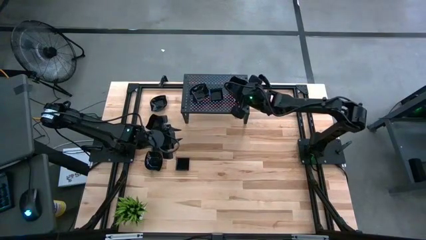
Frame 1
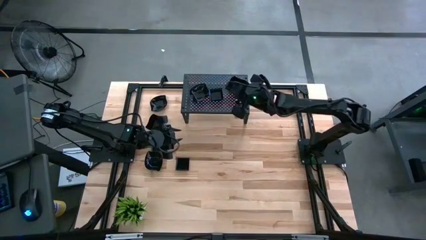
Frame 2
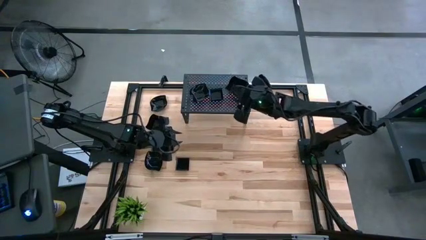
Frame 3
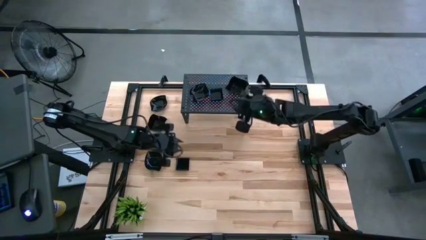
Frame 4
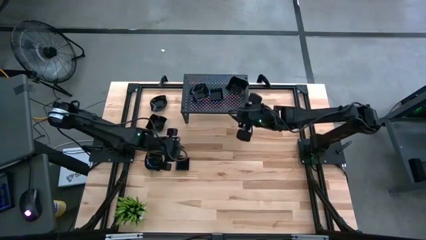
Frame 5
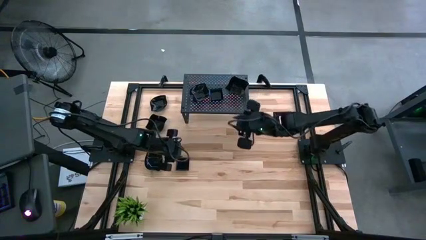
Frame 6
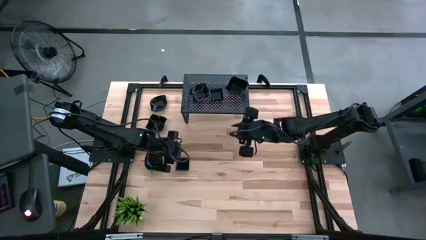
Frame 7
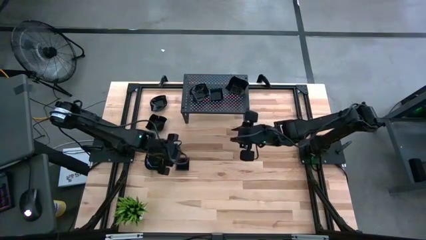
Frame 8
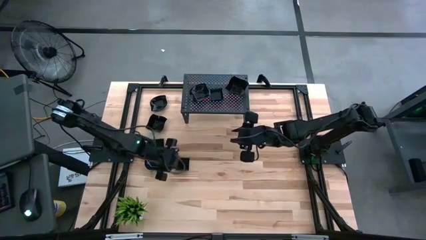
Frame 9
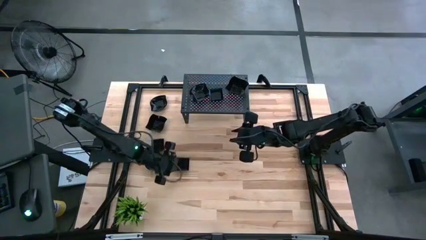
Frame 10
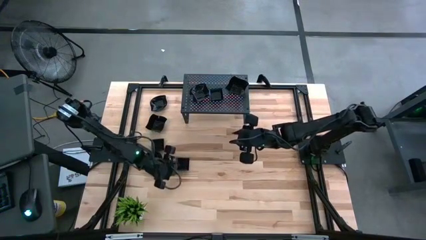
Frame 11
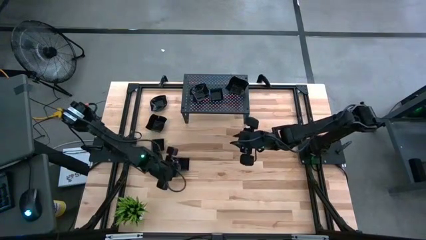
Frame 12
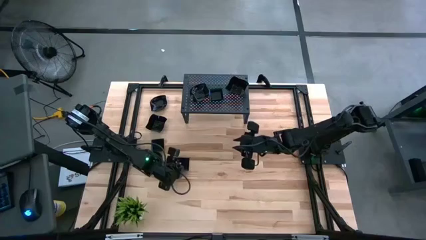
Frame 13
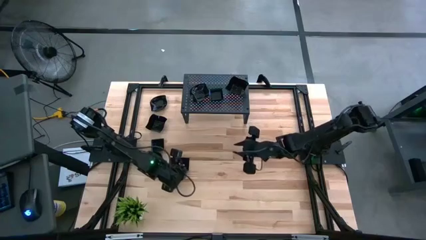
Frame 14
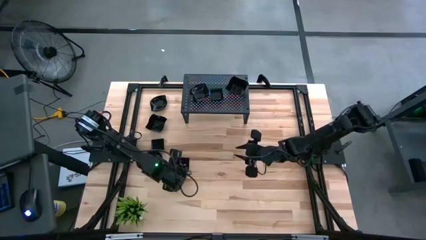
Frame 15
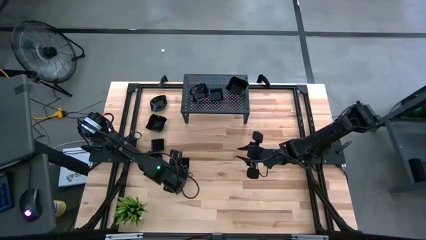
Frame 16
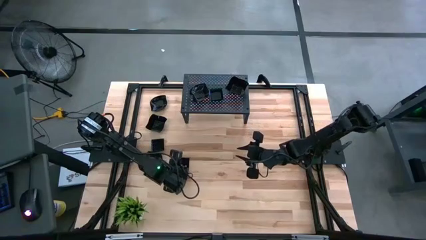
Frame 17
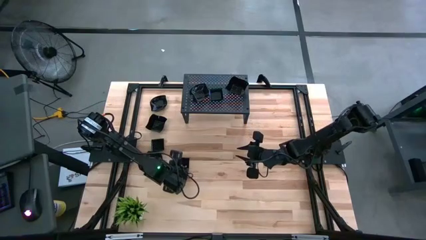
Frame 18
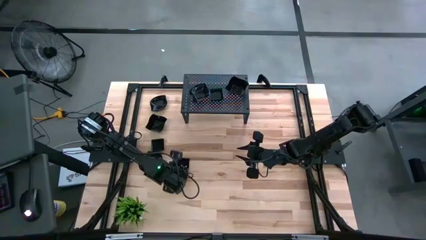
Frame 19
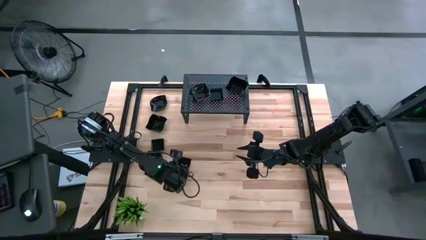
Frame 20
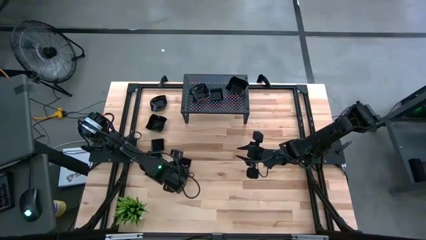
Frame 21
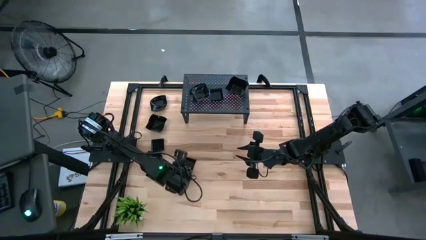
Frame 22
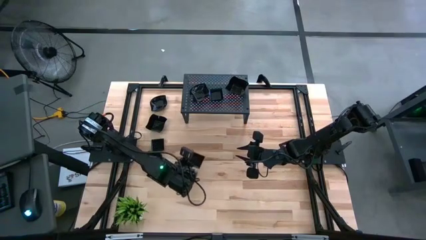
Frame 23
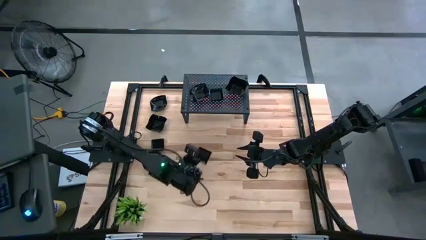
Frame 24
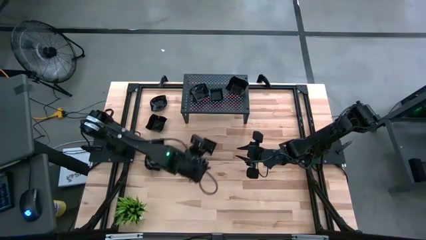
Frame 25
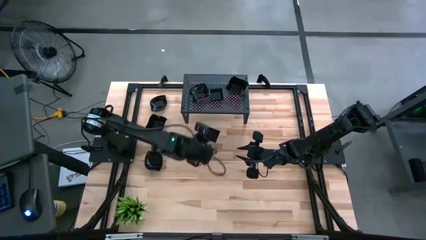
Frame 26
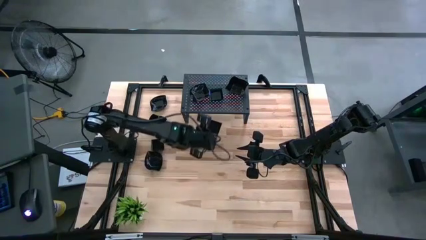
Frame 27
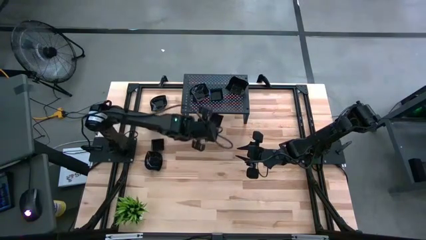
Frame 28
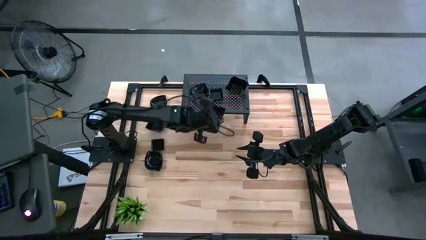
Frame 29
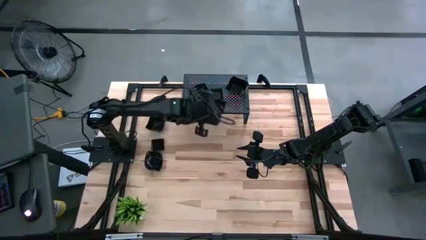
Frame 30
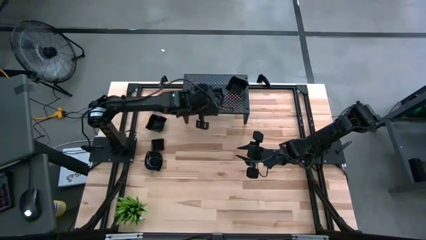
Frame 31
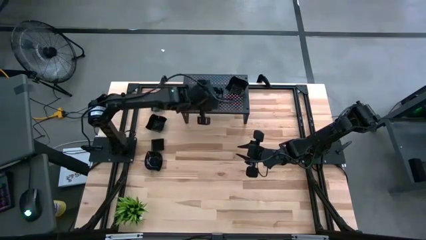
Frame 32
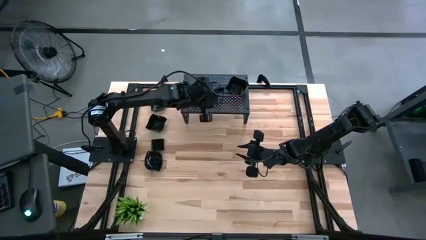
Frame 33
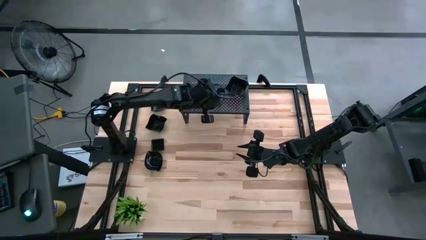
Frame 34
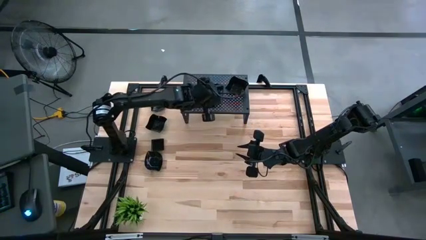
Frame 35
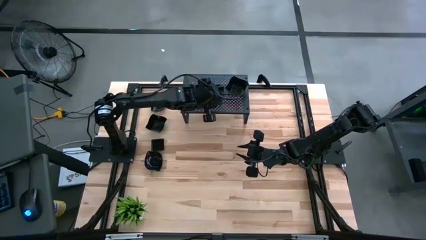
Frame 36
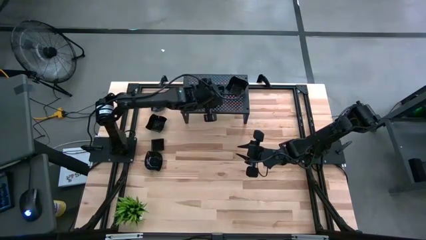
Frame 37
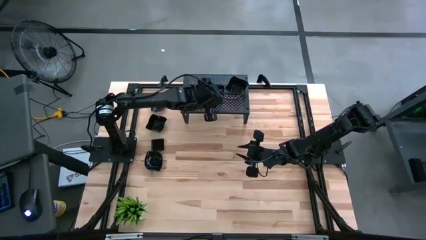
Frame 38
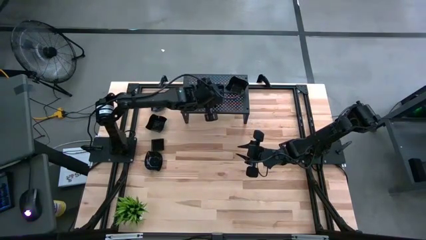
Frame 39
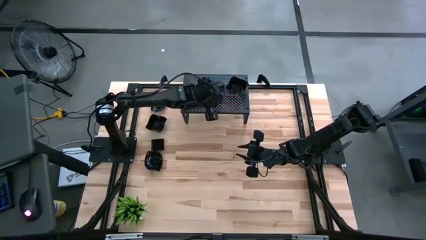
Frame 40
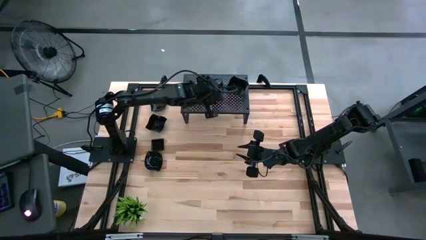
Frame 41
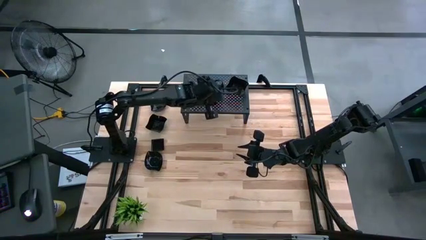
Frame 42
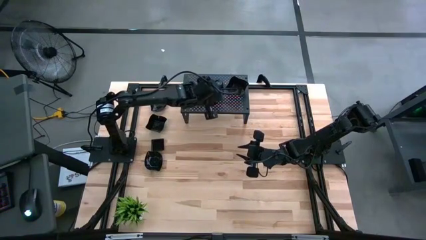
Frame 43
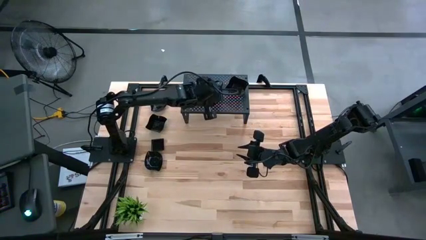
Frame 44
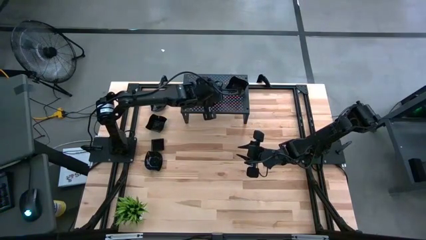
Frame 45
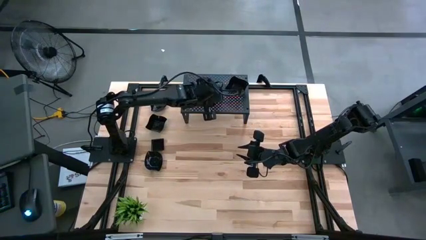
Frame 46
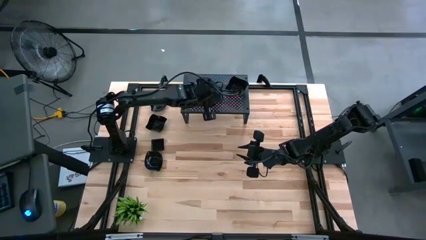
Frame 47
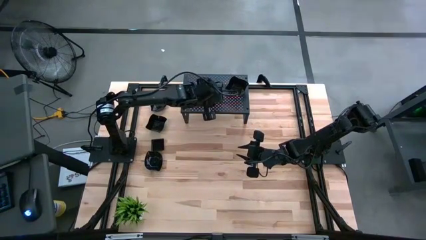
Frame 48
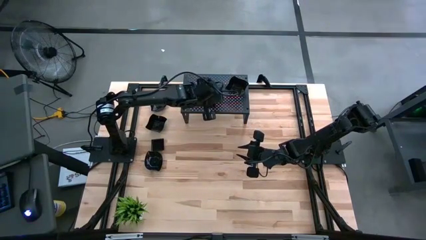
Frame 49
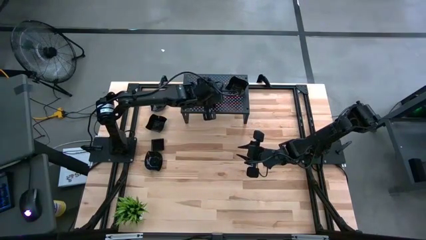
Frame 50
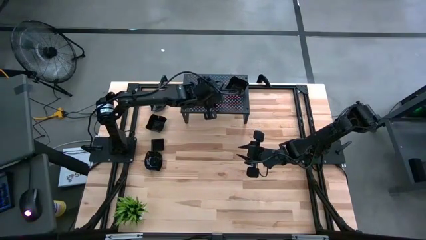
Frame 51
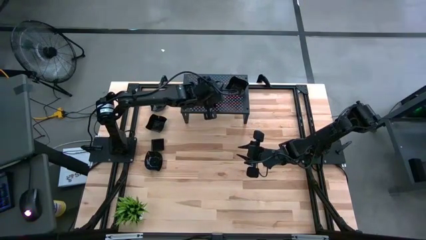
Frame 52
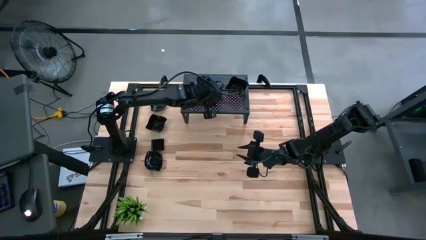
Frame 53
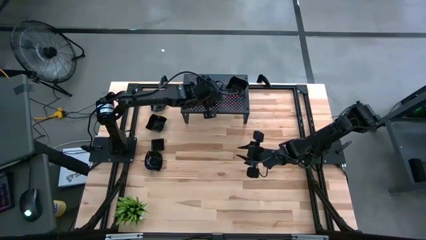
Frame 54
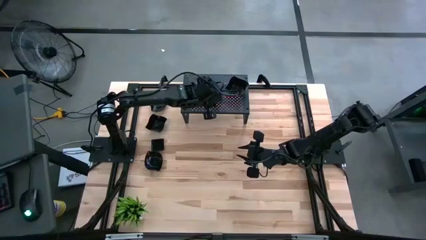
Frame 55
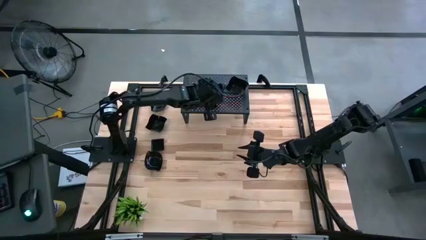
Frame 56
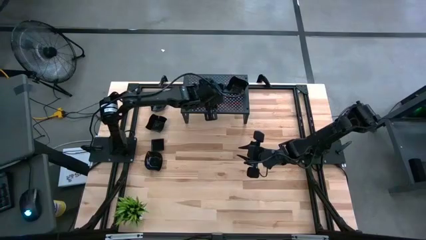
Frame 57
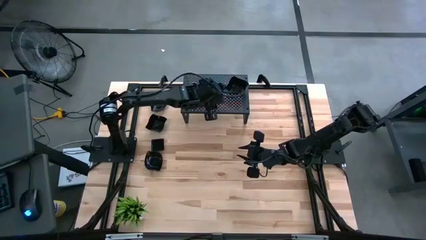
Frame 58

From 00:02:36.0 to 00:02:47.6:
Task: Pick & Place Mini shaped plates
Stack the black square plate on top of the black square plate on the shelf

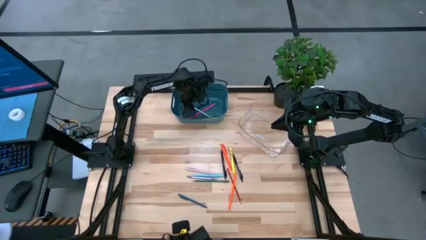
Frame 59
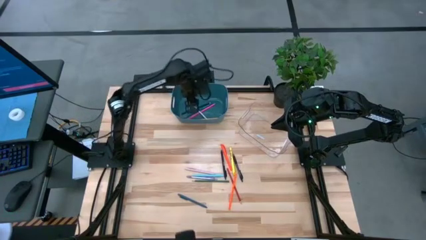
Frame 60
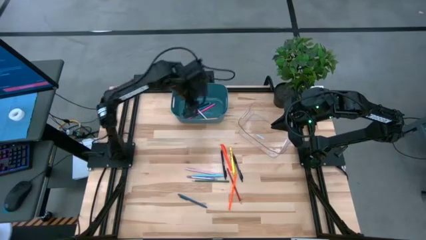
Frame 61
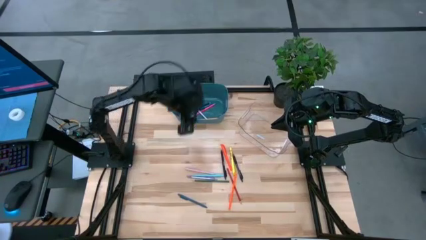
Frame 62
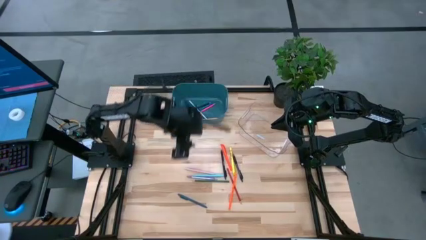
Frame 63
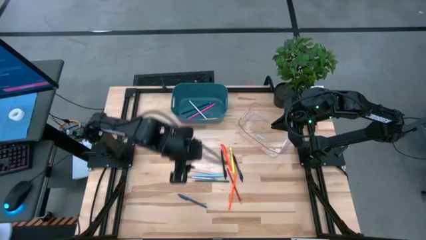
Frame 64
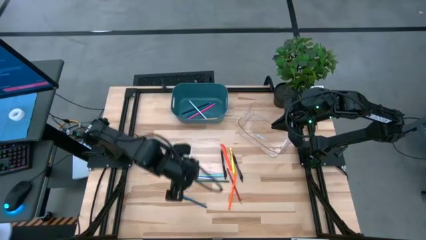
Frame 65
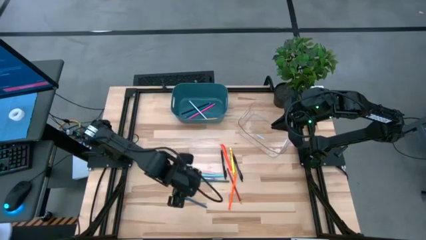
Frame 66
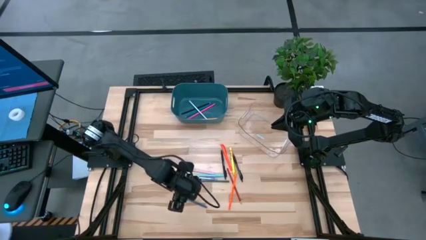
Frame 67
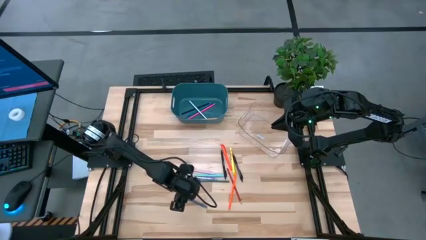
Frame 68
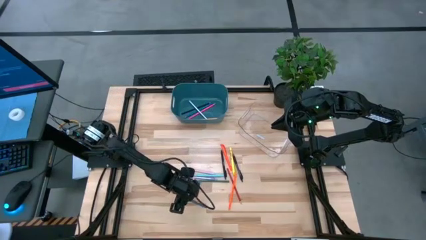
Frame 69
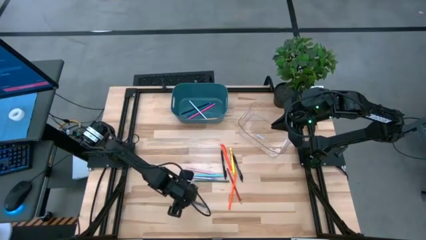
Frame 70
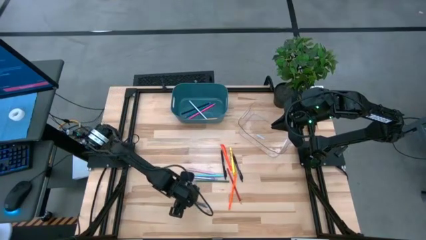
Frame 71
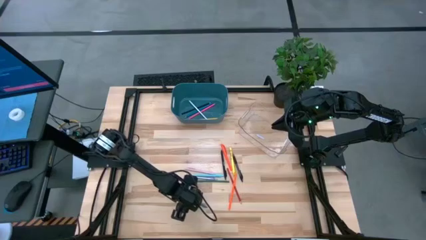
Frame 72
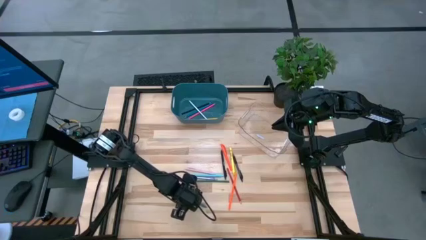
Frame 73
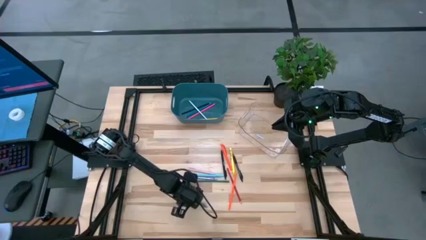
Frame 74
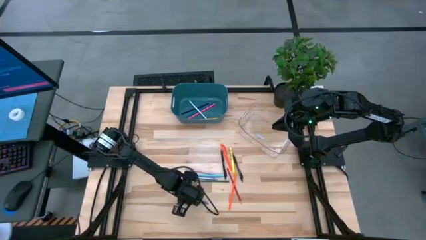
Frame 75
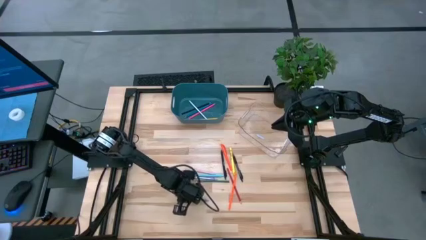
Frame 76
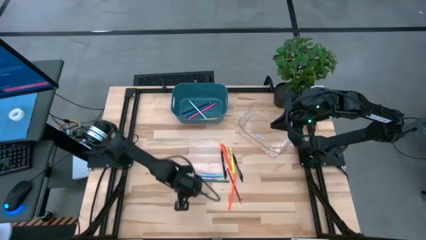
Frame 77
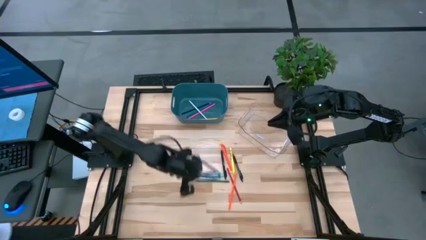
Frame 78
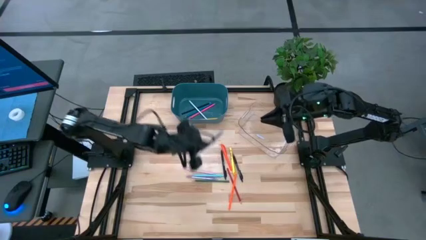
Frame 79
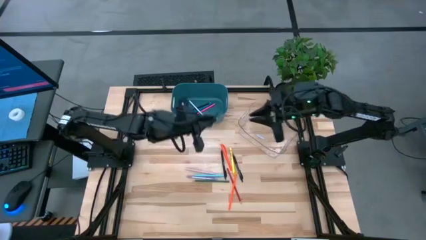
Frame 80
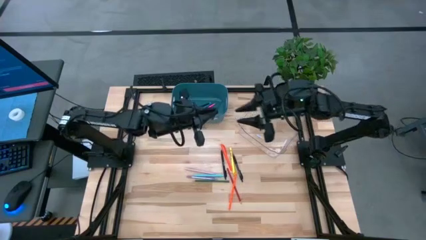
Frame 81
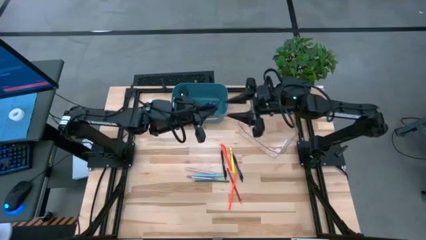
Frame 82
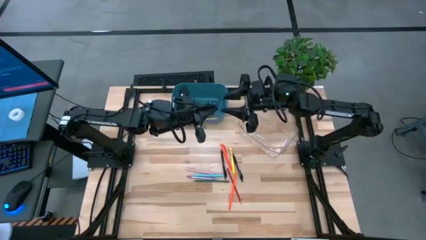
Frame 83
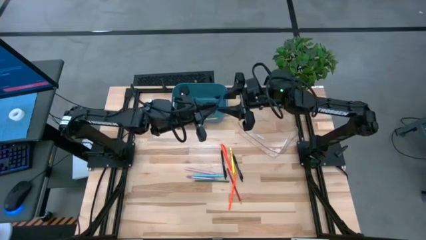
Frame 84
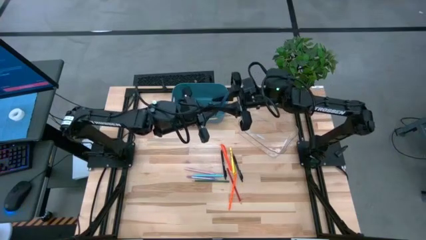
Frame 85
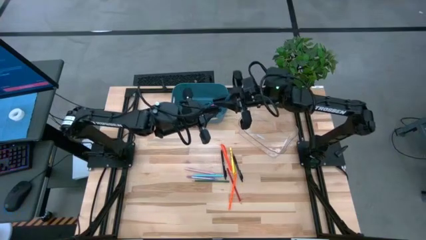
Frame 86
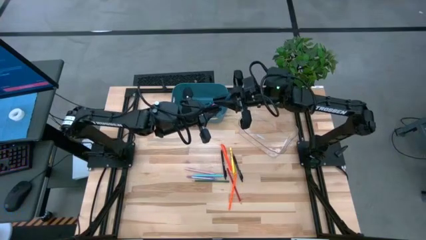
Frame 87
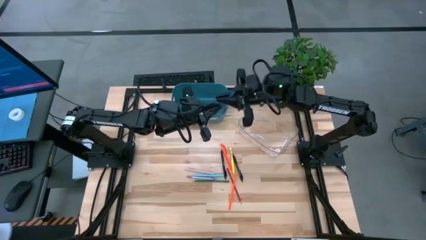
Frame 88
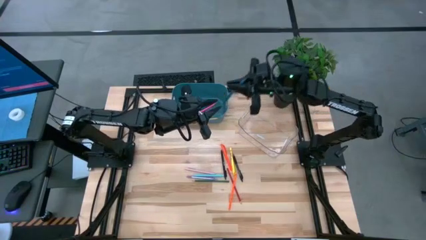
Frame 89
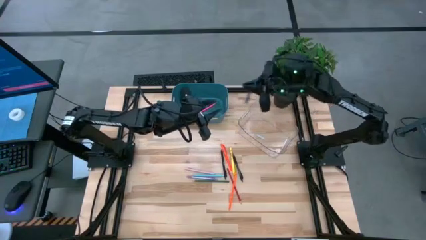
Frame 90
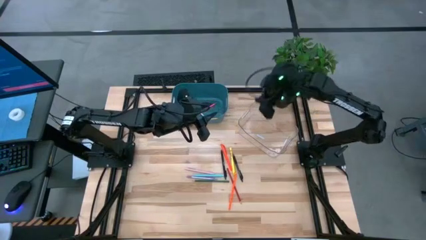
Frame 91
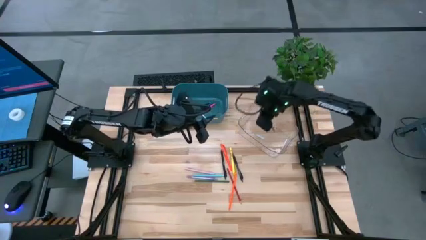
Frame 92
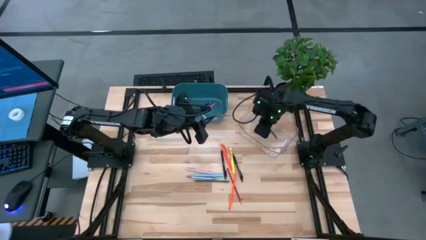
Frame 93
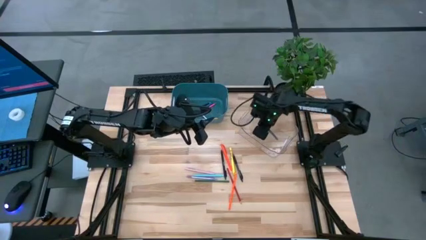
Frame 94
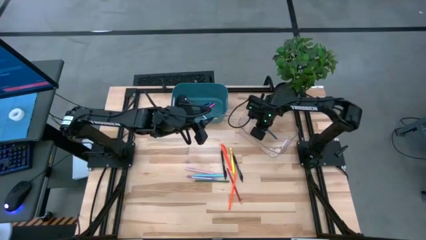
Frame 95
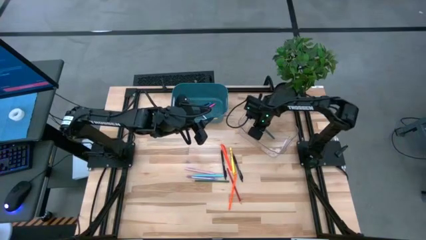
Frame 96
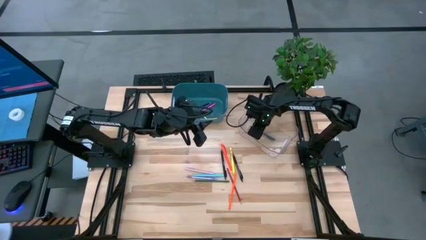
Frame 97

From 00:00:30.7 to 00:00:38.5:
Task: Sort pens & pencils
Put the dark blue pen into the transparent bin
